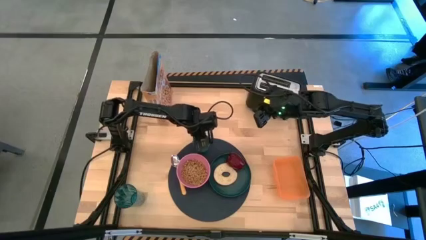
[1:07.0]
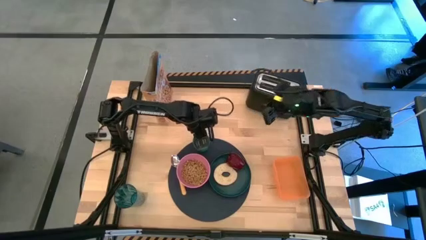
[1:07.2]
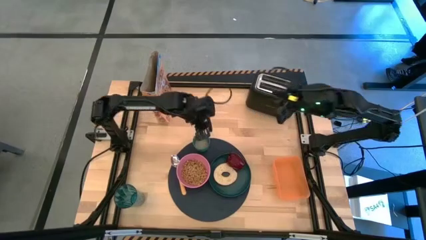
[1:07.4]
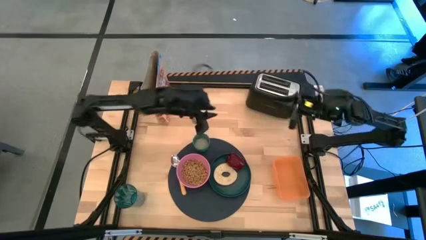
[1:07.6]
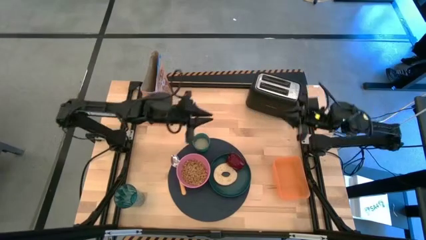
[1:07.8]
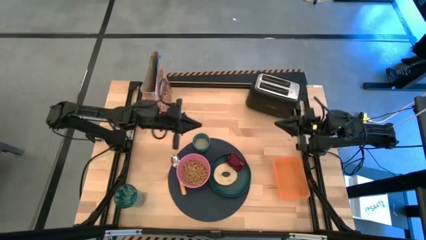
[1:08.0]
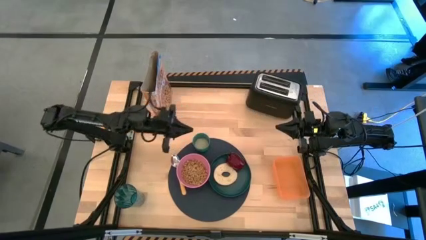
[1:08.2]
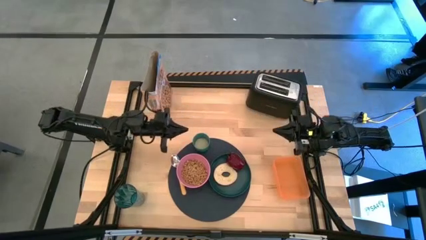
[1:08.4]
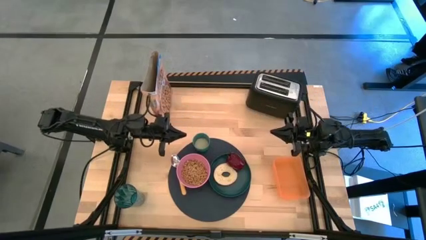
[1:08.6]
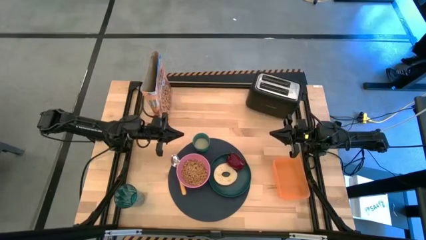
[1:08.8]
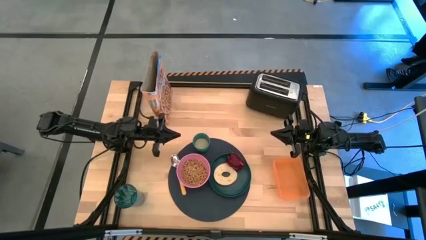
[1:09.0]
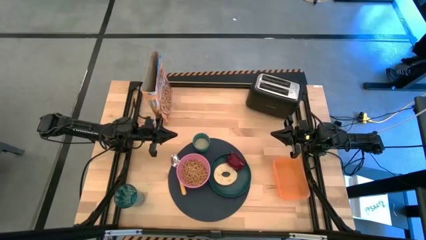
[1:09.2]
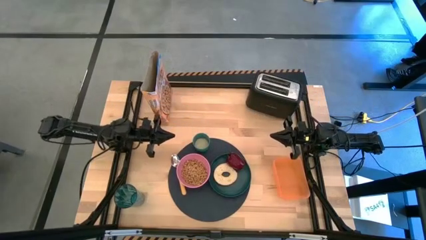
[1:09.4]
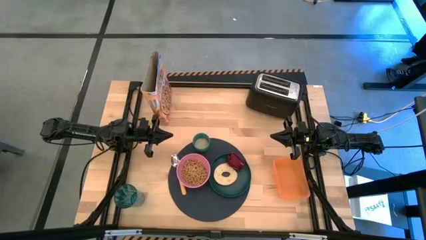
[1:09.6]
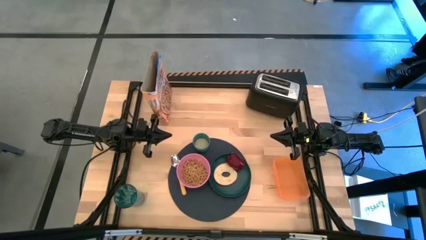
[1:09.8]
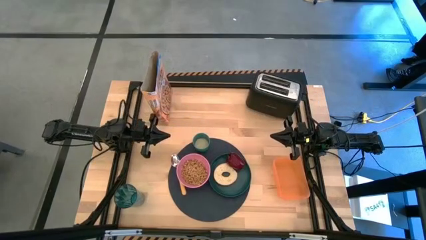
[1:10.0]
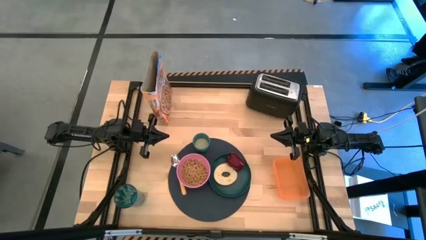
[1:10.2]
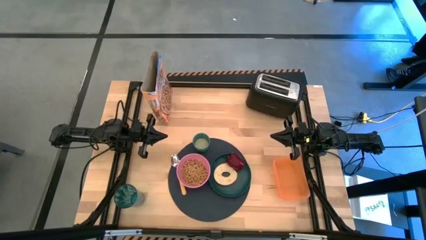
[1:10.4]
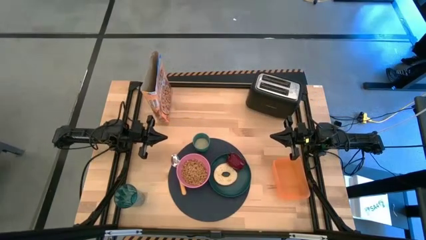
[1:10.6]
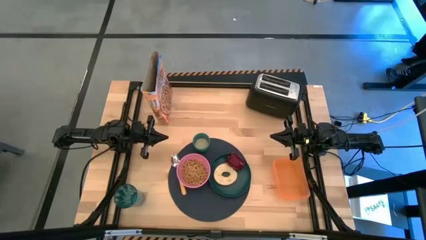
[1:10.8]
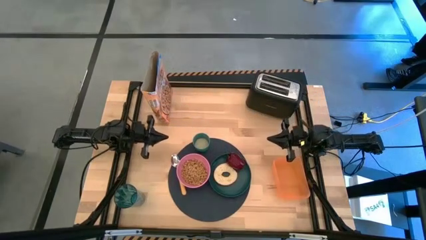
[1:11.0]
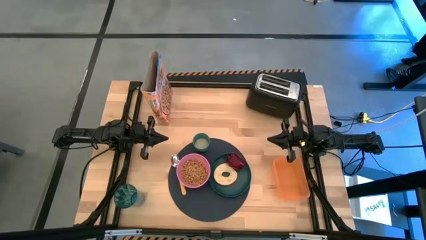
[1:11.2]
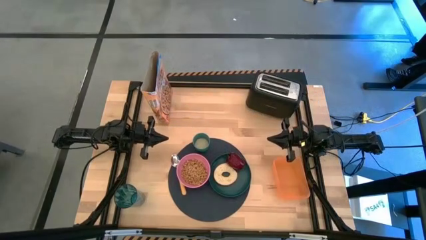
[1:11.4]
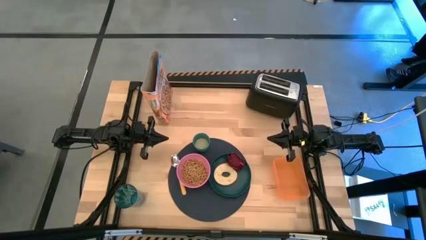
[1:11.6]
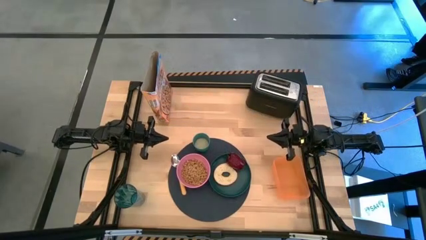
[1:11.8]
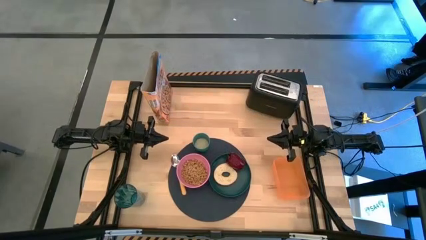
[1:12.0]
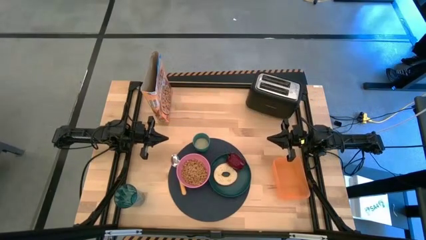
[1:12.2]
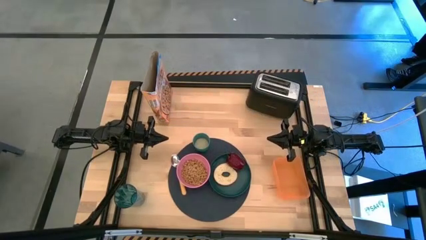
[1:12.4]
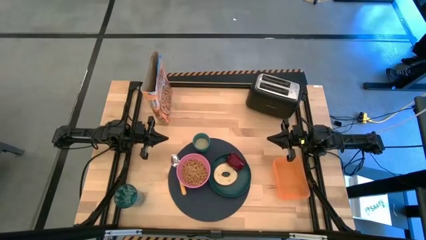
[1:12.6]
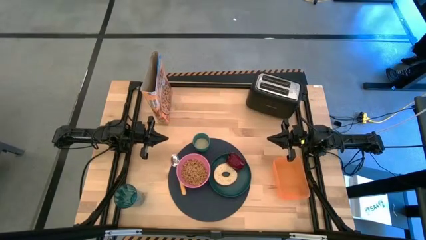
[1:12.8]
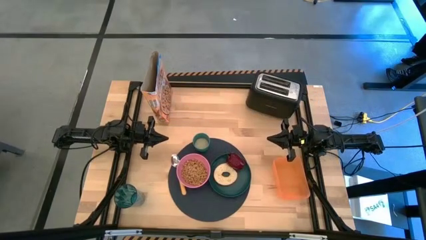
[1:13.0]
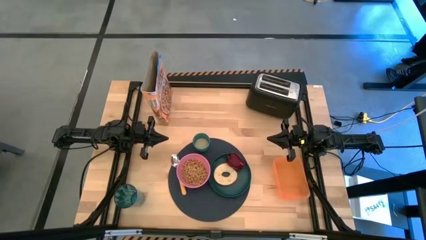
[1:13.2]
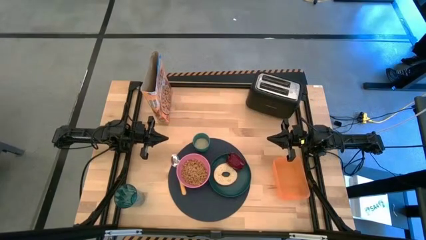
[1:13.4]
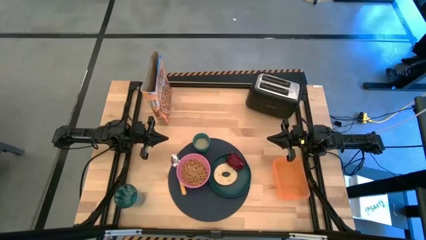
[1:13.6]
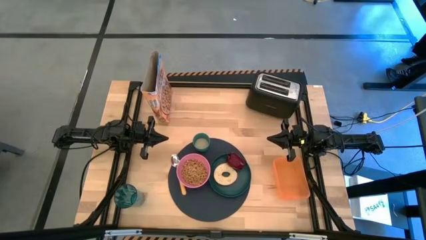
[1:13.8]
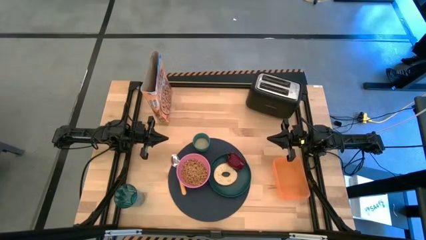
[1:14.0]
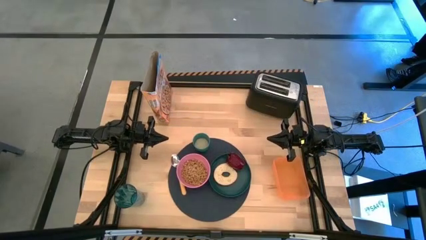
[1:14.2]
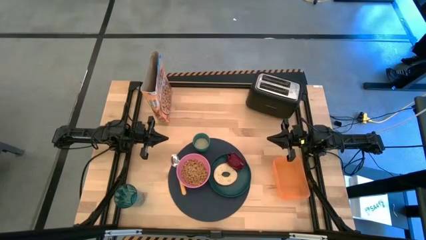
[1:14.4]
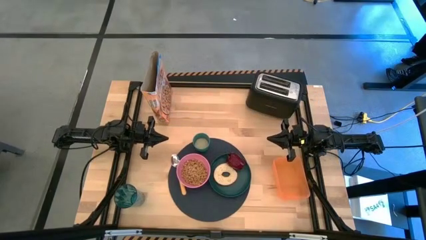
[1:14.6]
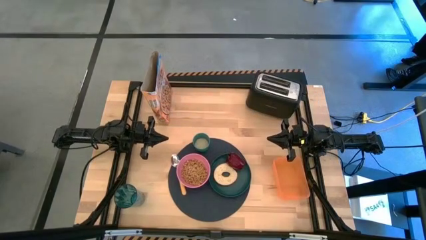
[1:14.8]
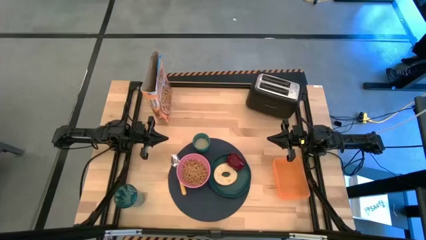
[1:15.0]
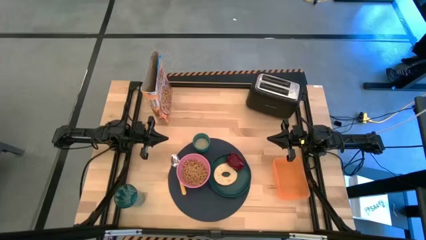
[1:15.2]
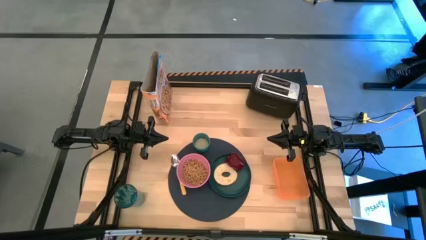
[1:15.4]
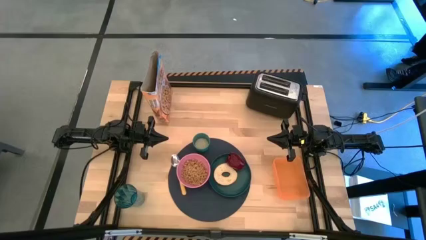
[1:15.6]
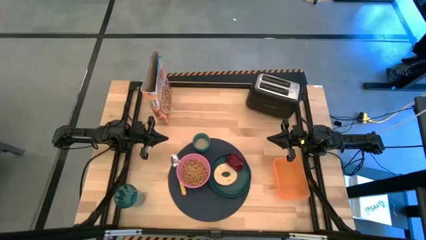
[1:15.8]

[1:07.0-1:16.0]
Task: Arrange a breakfast setting
Return to Home Position

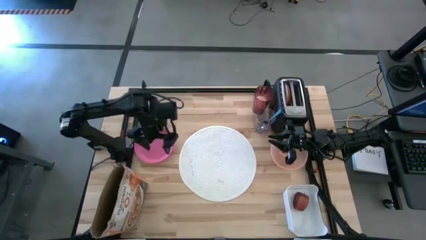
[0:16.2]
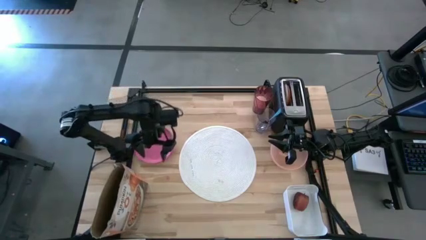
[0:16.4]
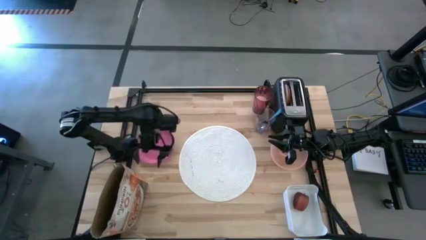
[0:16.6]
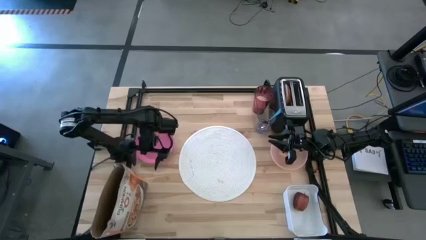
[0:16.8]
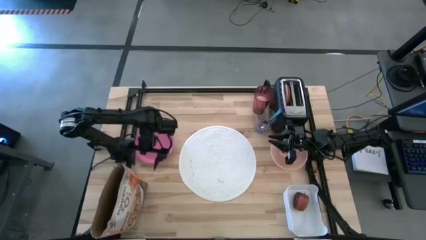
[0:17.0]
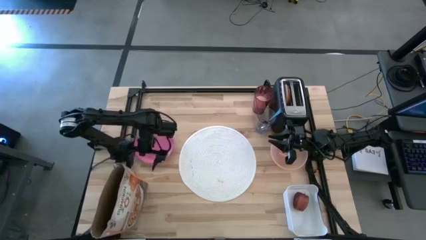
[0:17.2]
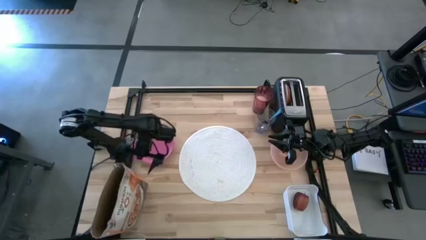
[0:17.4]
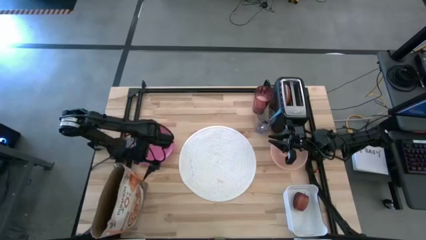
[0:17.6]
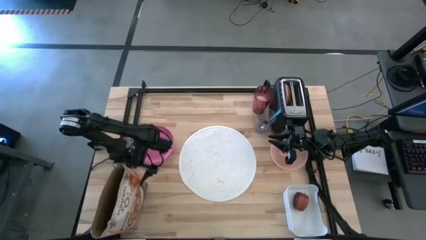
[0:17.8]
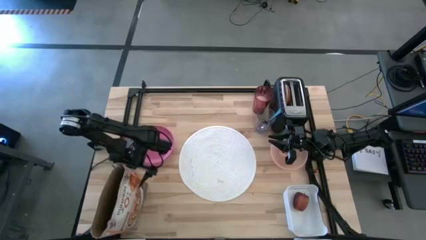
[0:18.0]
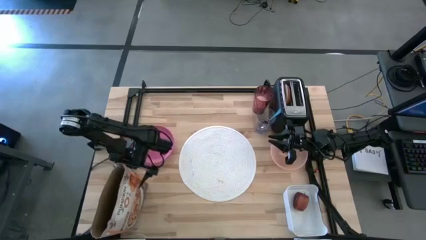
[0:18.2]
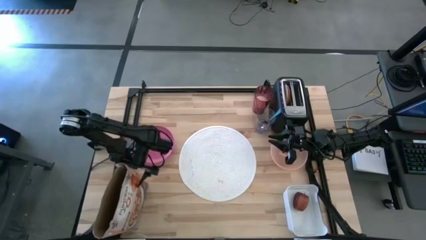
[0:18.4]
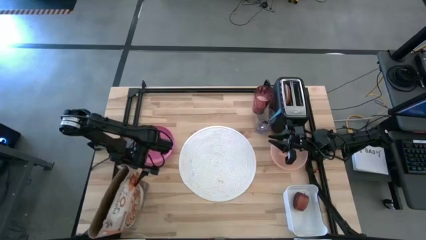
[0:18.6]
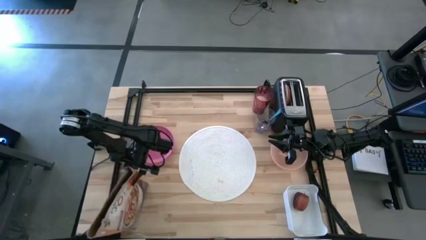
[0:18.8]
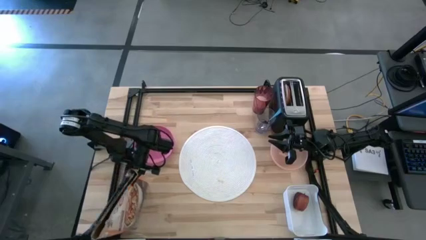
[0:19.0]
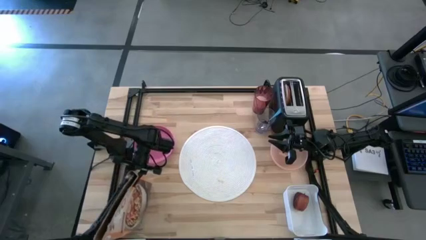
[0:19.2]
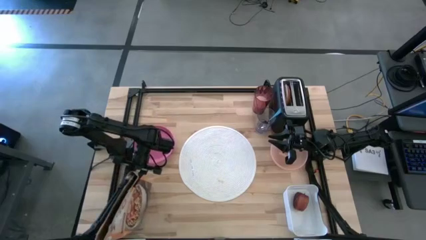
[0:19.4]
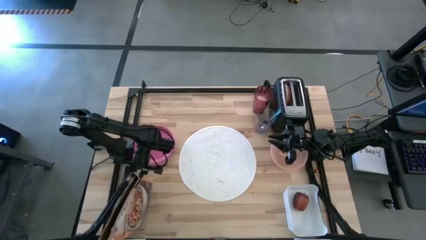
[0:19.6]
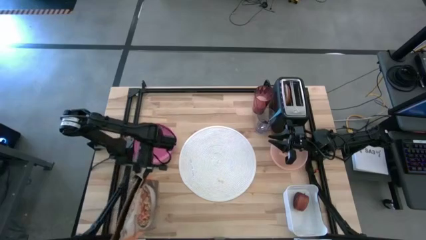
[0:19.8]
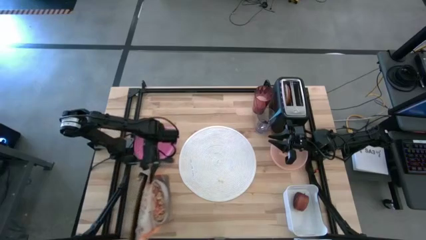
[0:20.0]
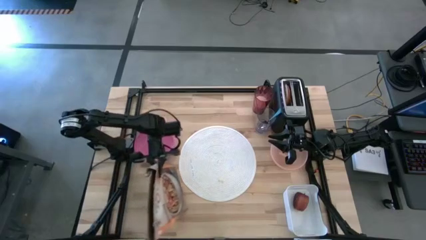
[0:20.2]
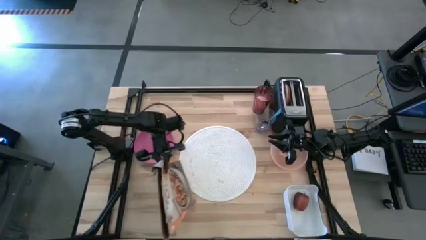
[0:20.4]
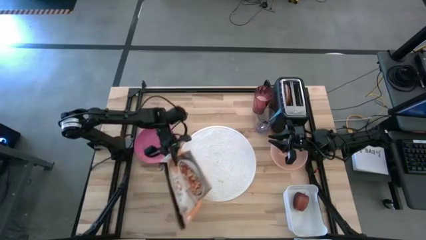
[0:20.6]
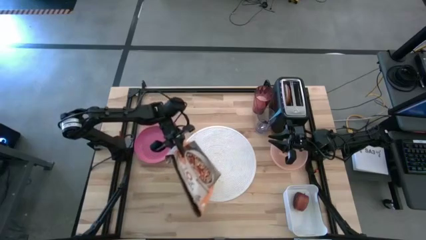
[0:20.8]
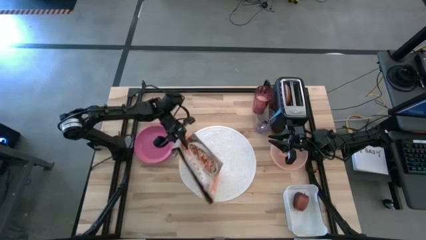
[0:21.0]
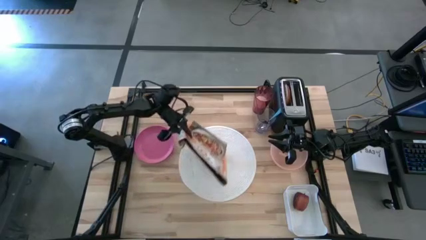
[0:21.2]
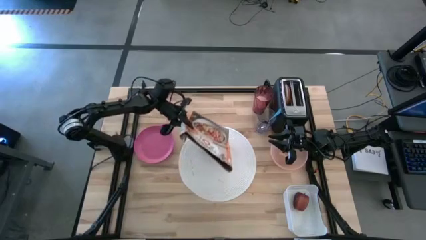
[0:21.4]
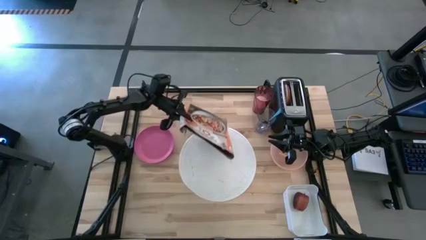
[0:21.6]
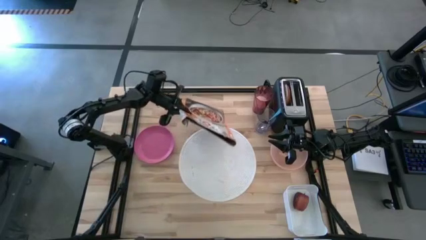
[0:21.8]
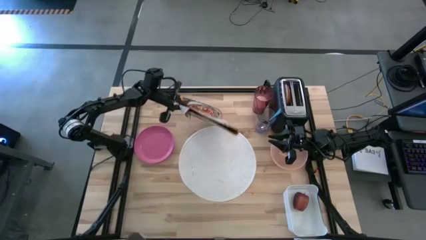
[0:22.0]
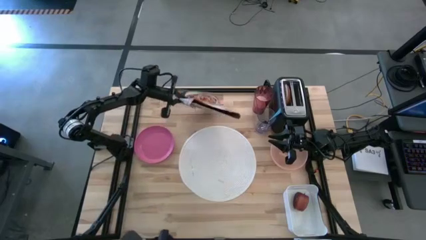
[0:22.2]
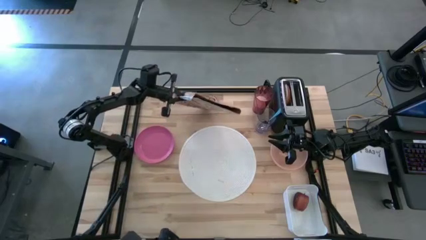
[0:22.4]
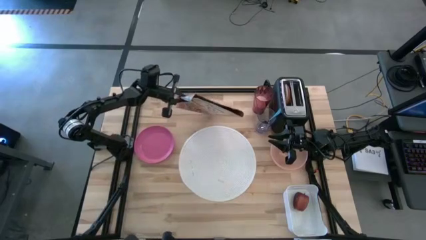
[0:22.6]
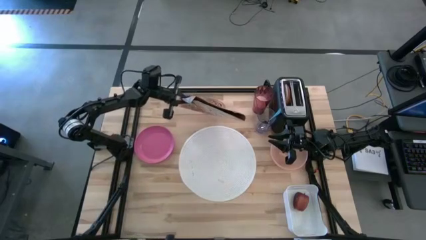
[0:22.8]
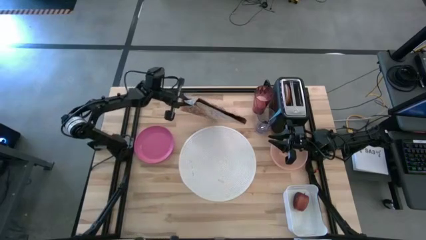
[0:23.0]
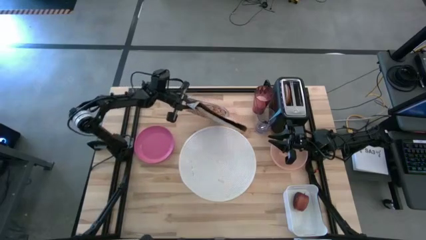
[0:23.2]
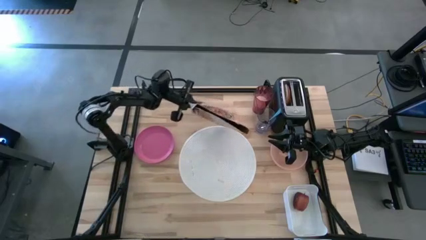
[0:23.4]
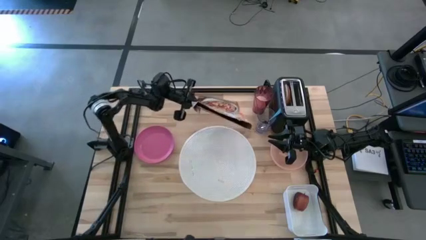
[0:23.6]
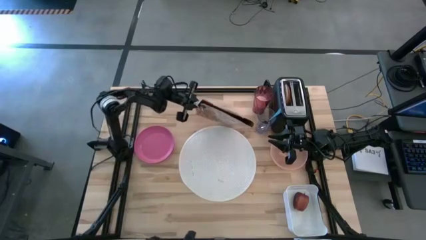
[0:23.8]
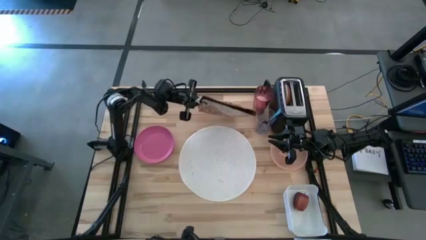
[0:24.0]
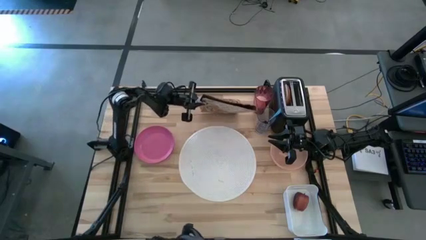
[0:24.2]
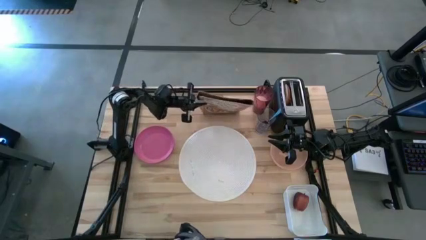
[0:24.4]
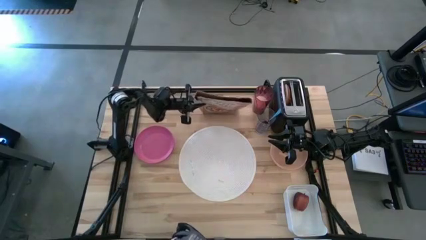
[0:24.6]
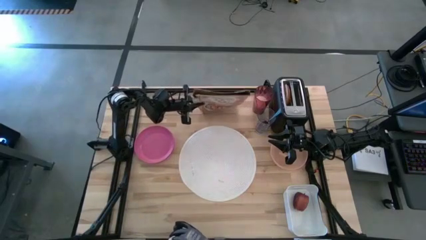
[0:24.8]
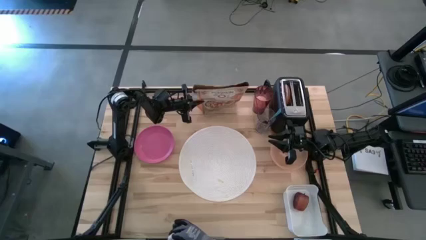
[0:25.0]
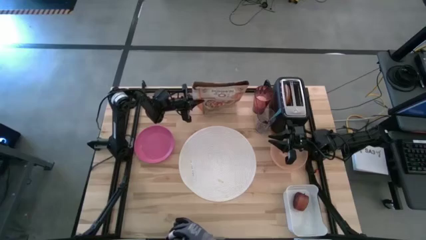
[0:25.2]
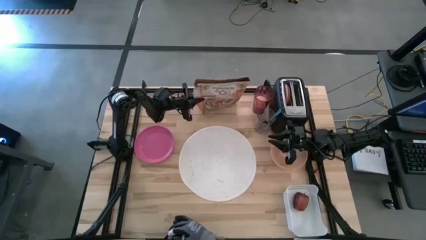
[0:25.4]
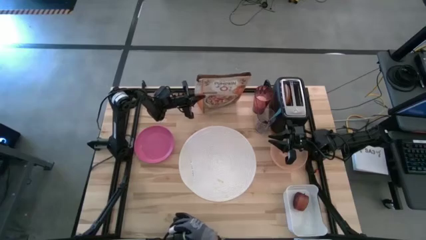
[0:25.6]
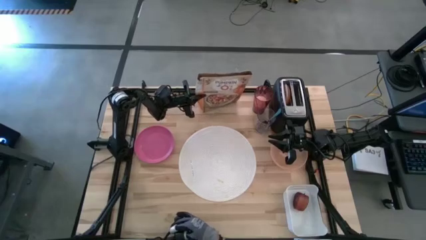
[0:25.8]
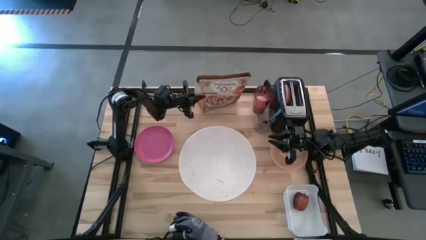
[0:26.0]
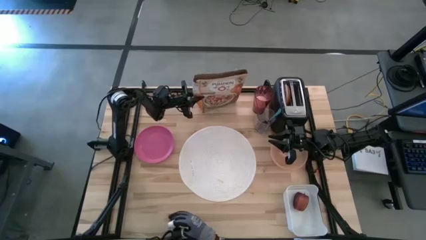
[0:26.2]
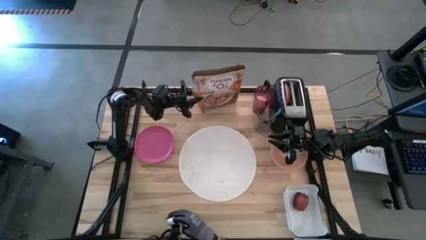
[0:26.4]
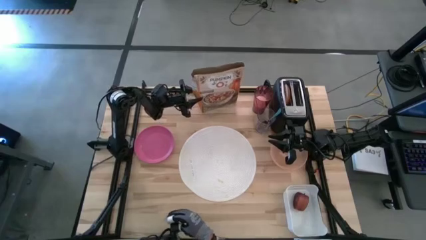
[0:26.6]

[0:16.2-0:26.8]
Task: Arrange a breakfast setting
Move the cereal box to the top center of the table
